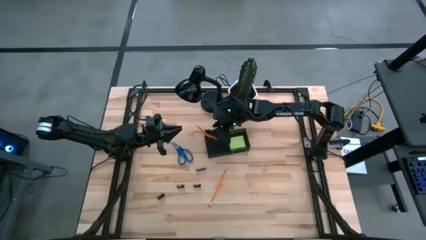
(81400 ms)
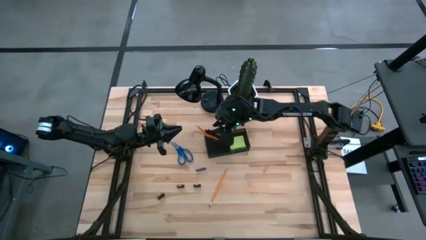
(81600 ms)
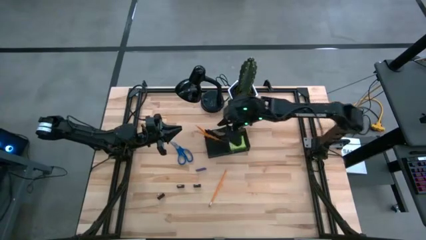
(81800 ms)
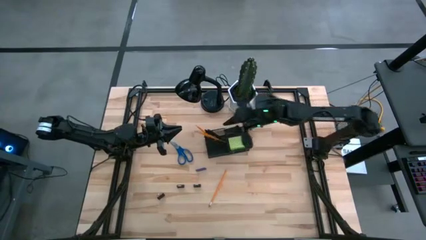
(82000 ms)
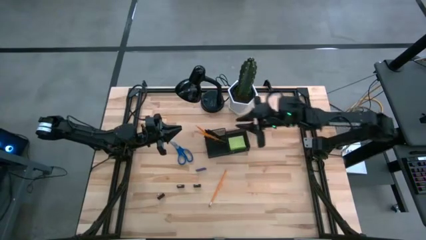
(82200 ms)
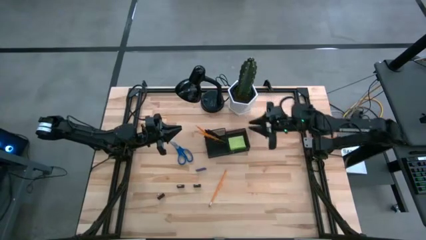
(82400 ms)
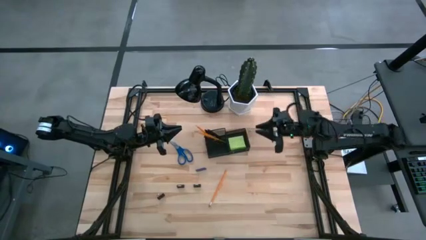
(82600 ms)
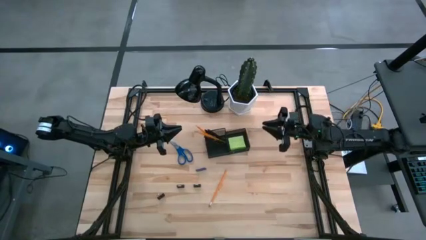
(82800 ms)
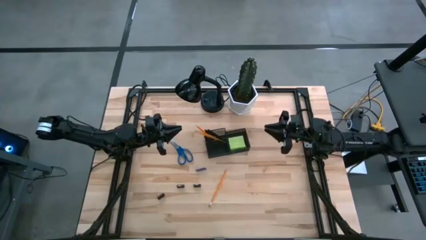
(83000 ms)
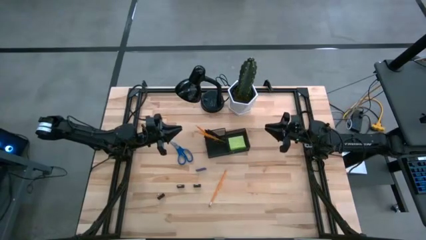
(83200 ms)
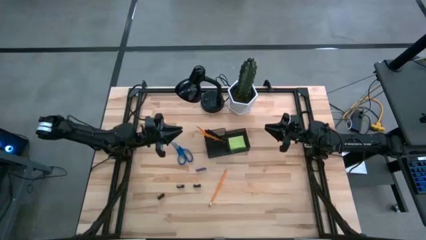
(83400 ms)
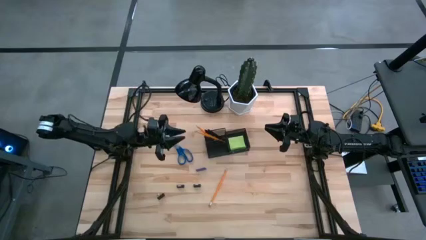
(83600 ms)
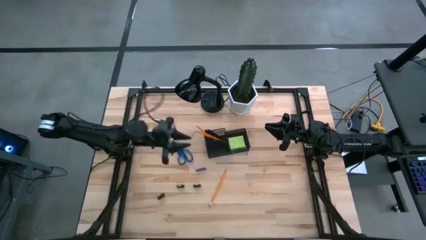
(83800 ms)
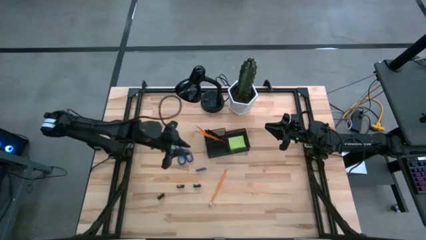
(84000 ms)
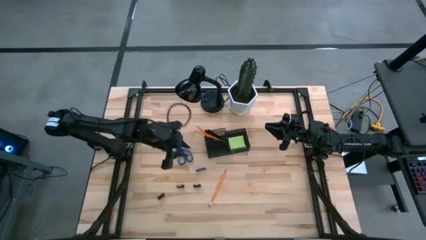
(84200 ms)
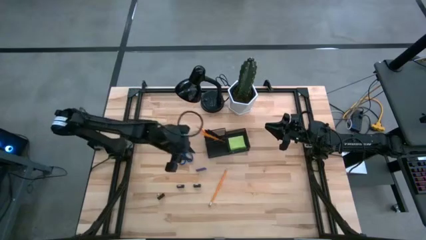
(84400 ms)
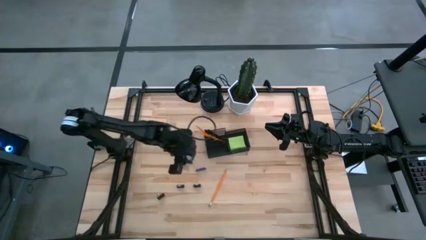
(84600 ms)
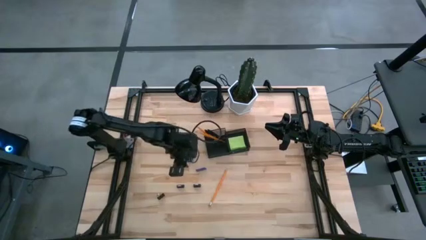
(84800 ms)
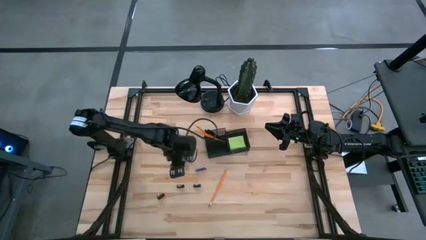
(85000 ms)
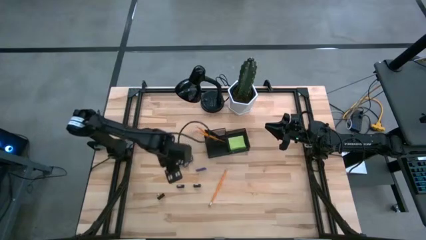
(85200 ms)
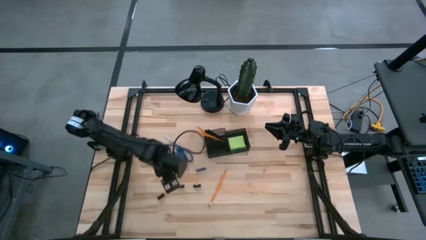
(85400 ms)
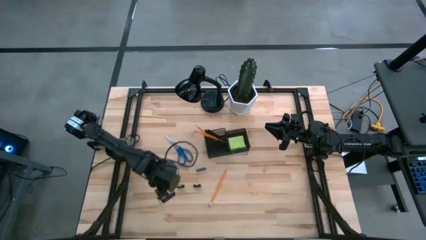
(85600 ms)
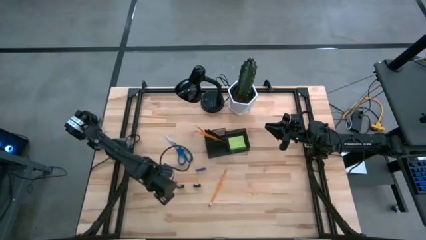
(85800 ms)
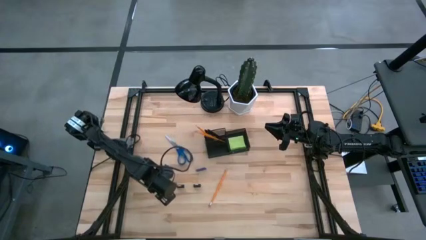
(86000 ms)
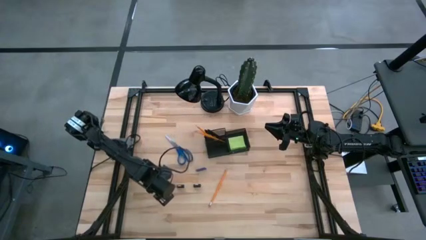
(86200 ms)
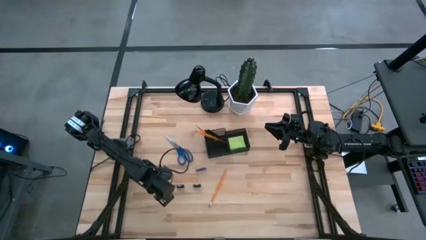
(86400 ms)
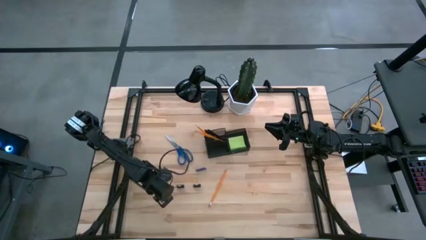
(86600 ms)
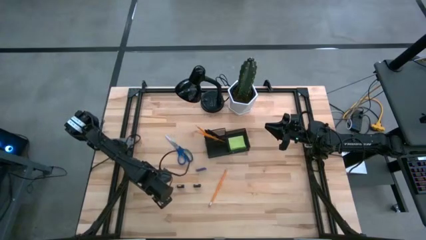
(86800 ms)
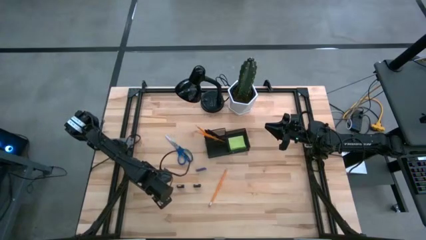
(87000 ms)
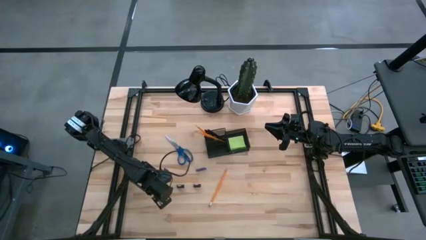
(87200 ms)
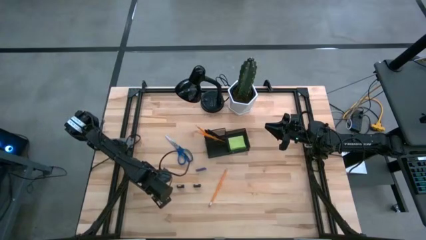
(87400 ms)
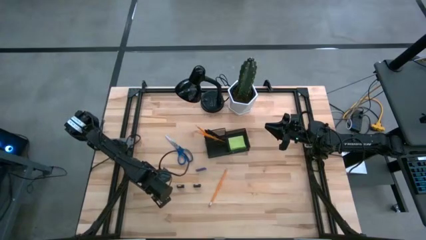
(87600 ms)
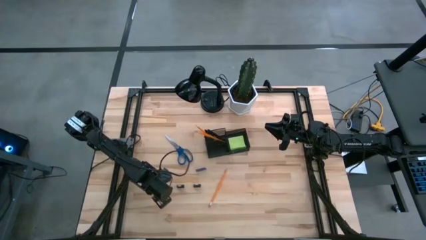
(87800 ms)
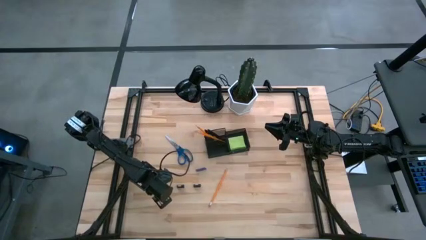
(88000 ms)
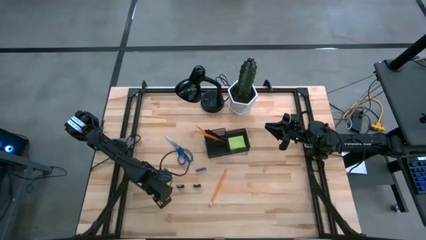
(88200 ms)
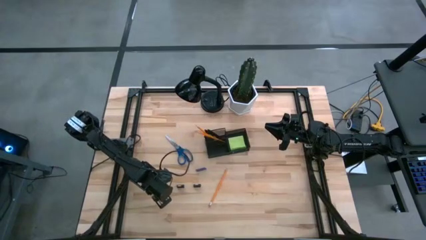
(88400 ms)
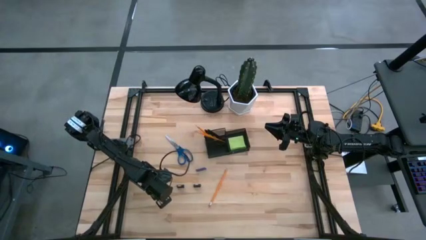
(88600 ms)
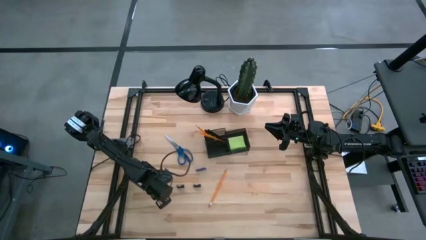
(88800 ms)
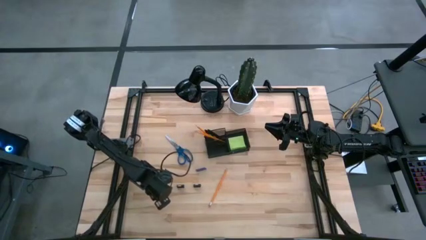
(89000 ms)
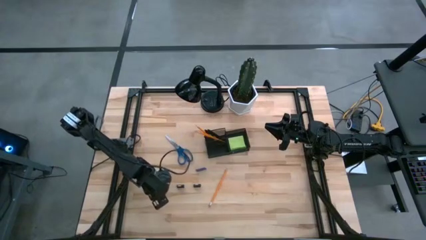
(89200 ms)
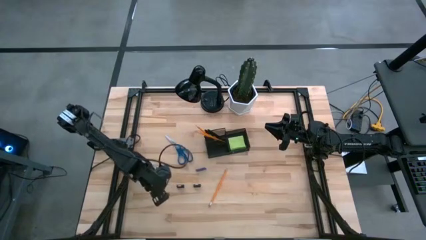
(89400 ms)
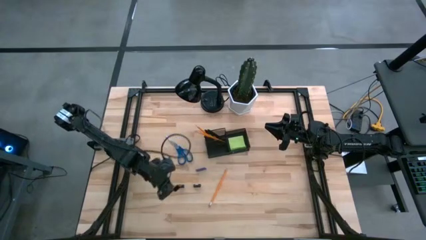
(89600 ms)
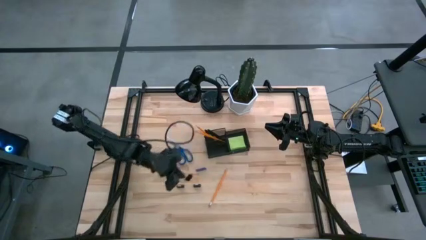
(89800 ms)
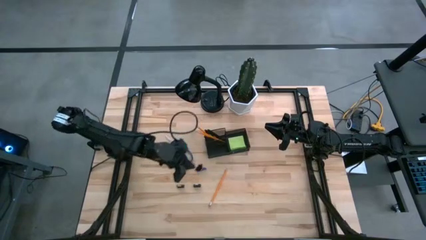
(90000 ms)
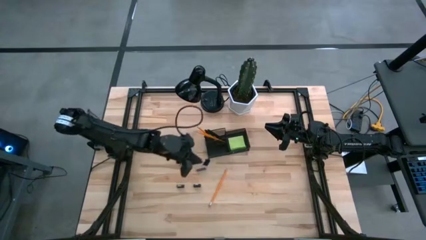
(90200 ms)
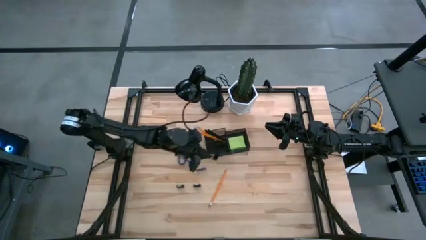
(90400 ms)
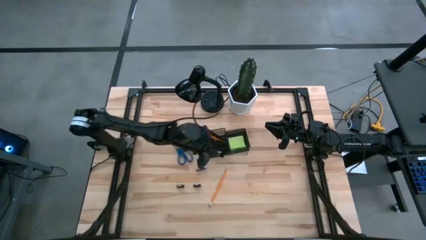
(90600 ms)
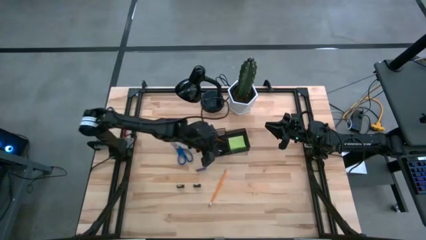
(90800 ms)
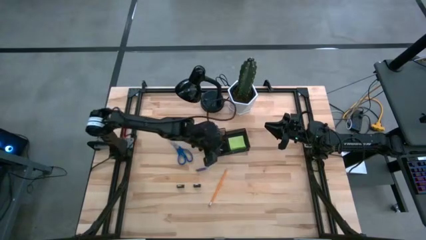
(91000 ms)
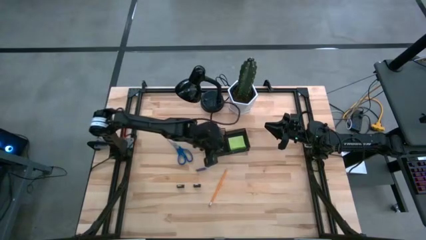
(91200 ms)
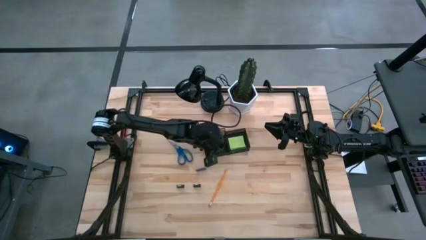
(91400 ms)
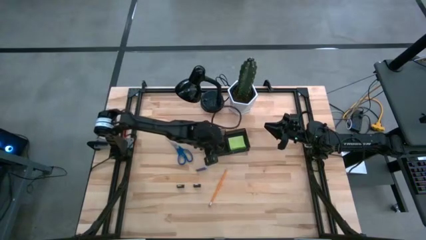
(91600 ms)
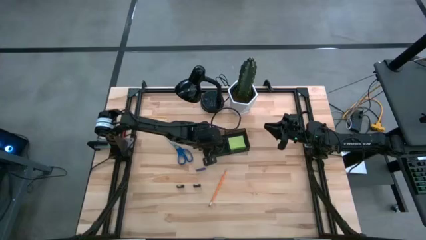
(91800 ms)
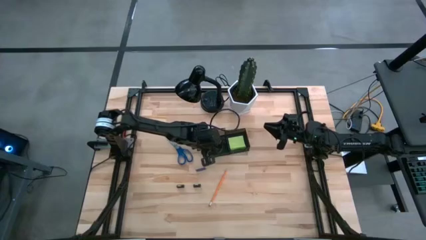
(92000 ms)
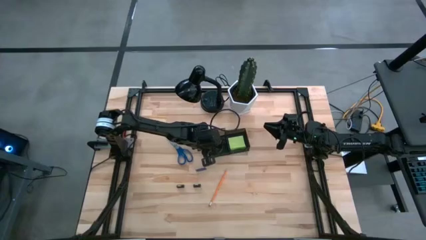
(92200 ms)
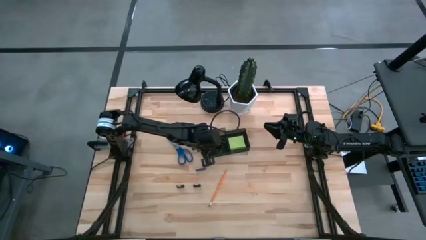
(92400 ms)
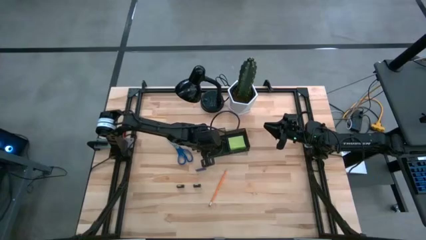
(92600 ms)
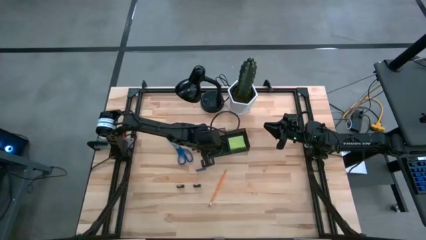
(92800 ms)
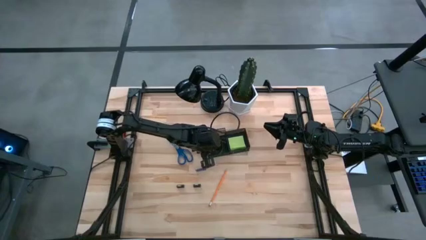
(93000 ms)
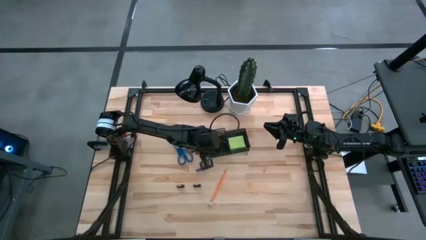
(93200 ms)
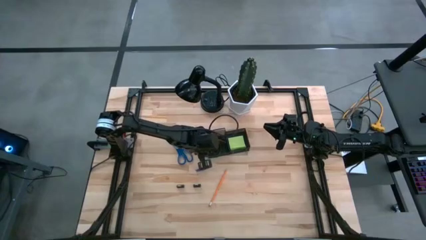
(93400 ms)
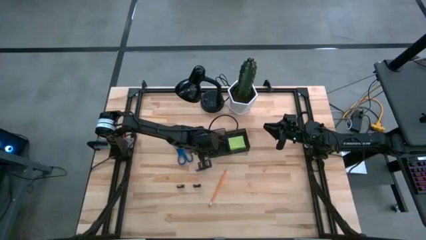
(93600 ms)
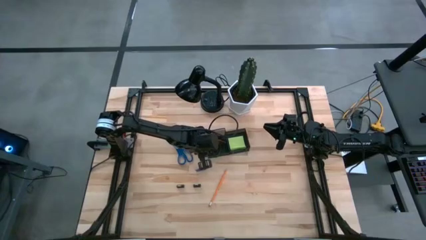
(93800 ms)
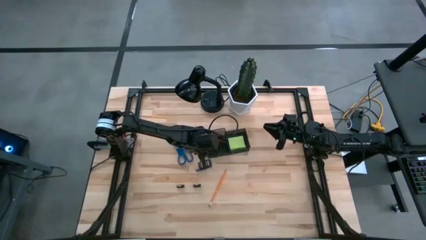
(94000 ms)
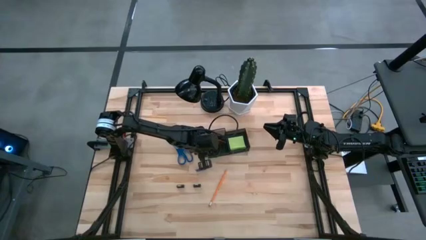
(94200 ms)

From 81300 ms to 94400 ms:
Task: Pick and place office supplies into organizer
Put the black binder clip into the desk organizer
